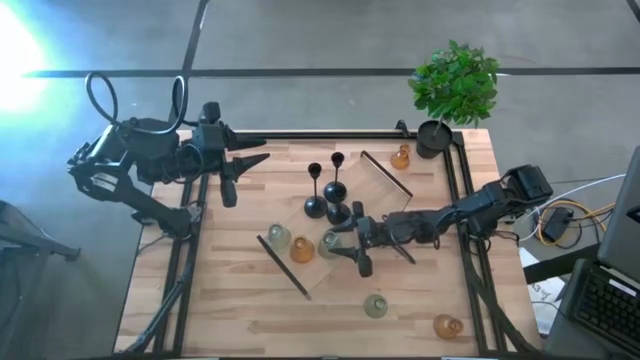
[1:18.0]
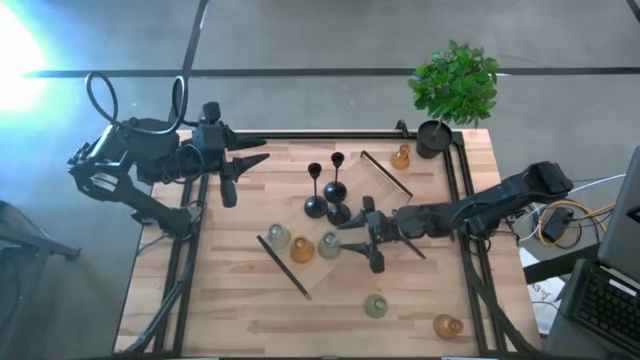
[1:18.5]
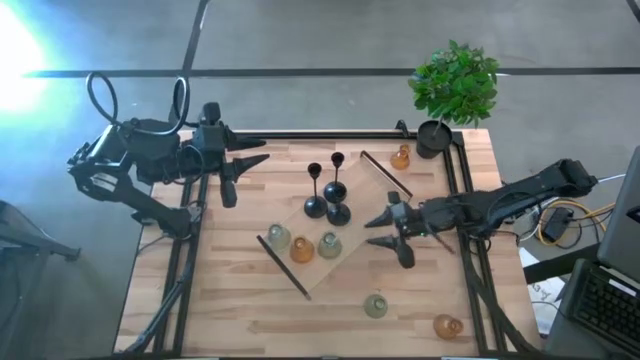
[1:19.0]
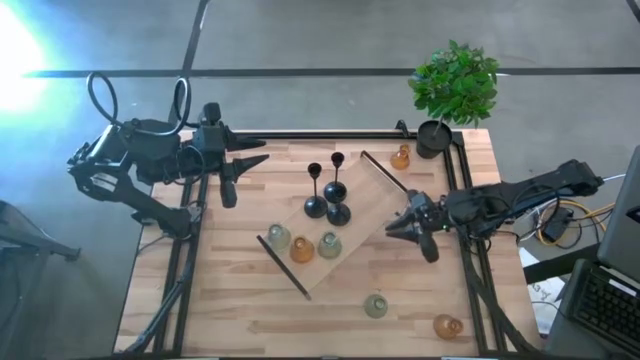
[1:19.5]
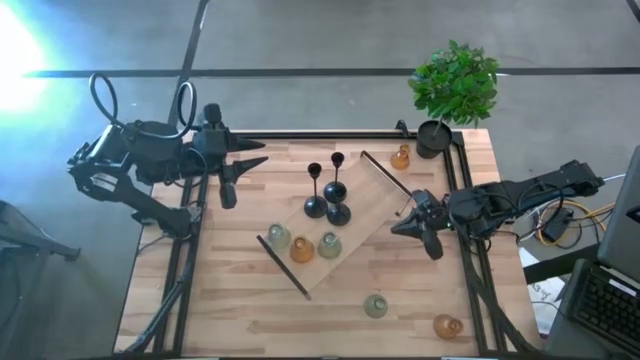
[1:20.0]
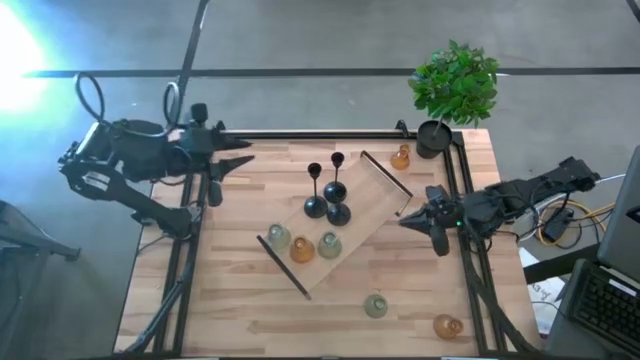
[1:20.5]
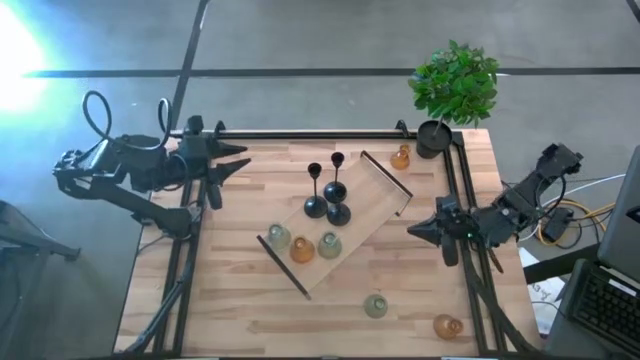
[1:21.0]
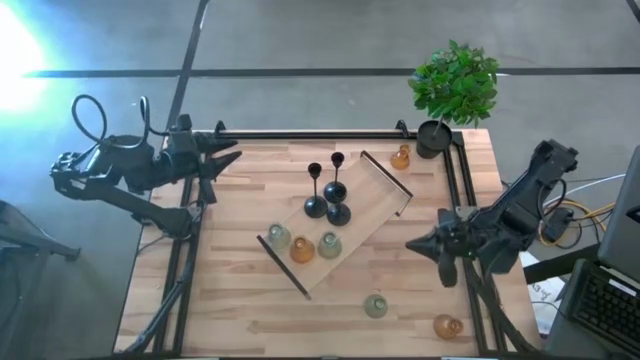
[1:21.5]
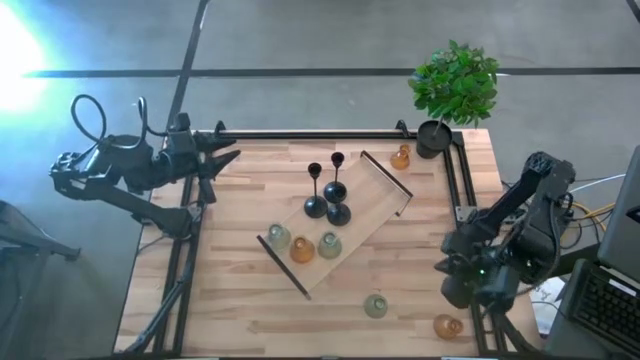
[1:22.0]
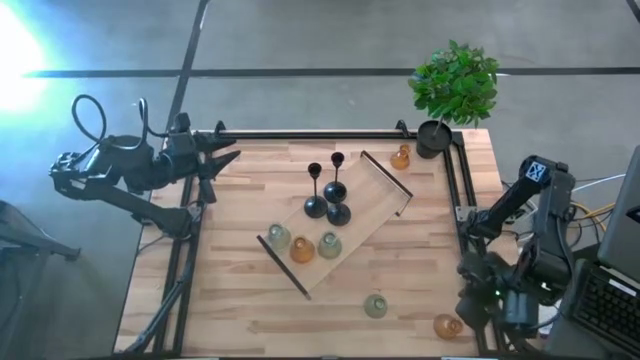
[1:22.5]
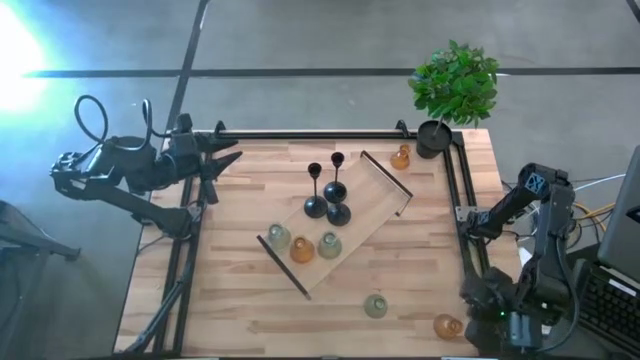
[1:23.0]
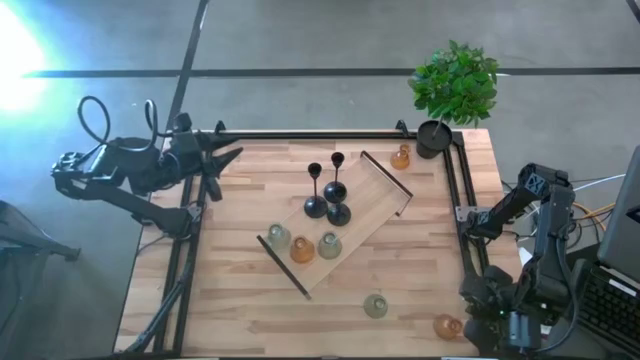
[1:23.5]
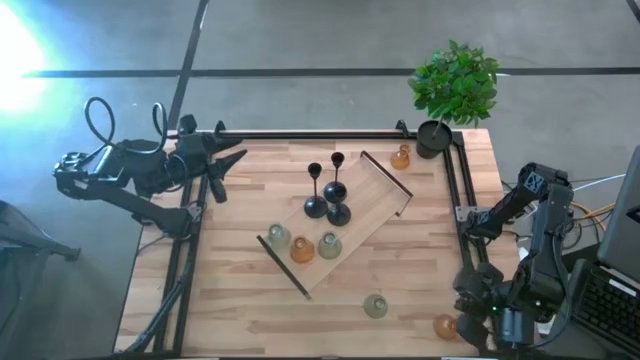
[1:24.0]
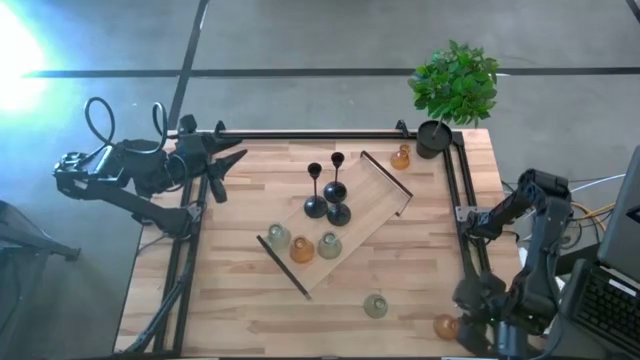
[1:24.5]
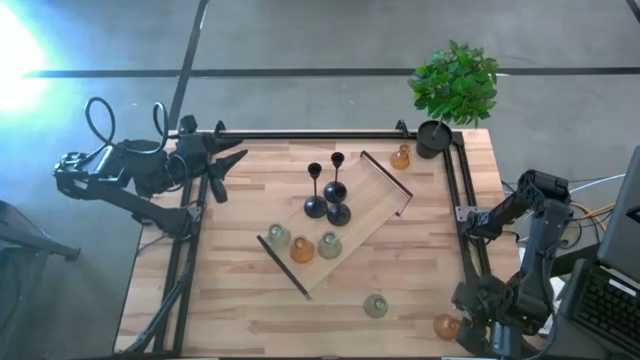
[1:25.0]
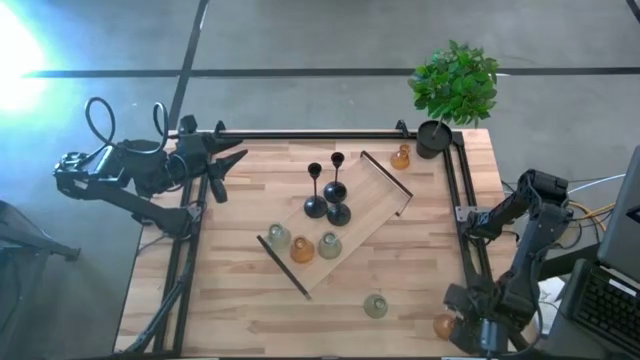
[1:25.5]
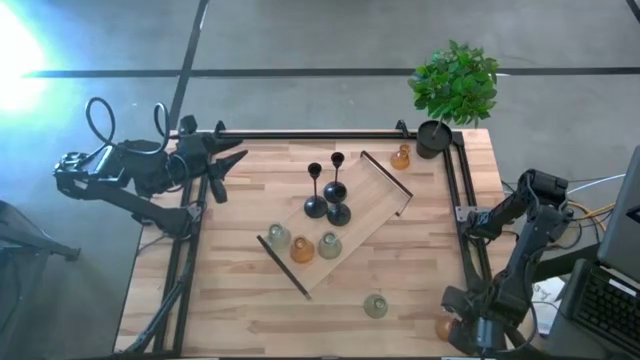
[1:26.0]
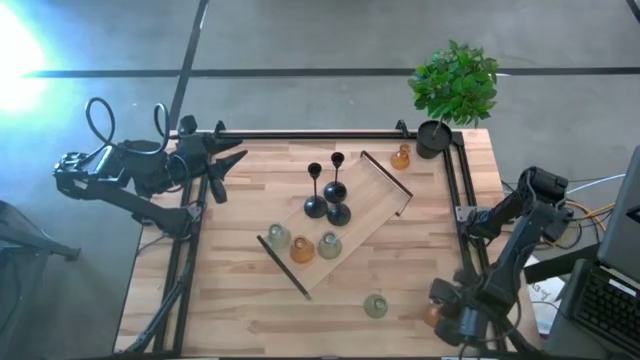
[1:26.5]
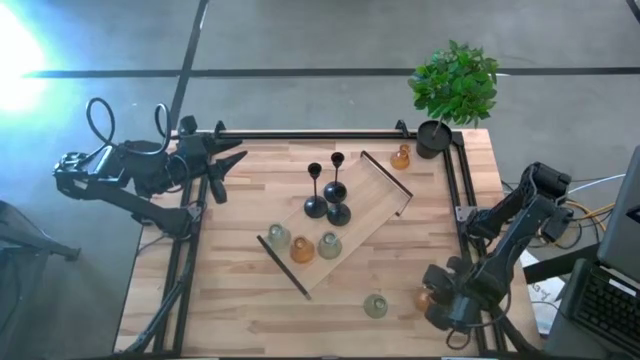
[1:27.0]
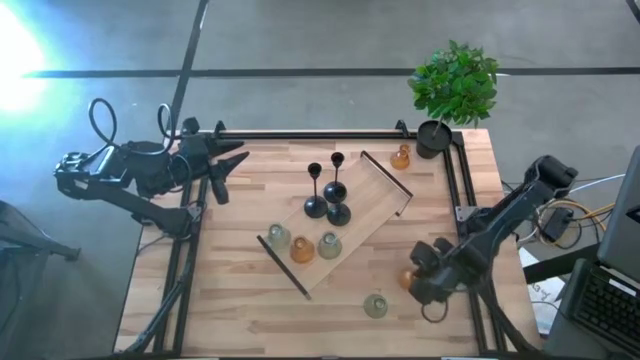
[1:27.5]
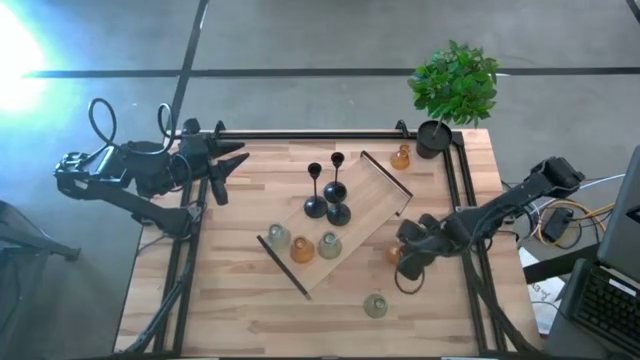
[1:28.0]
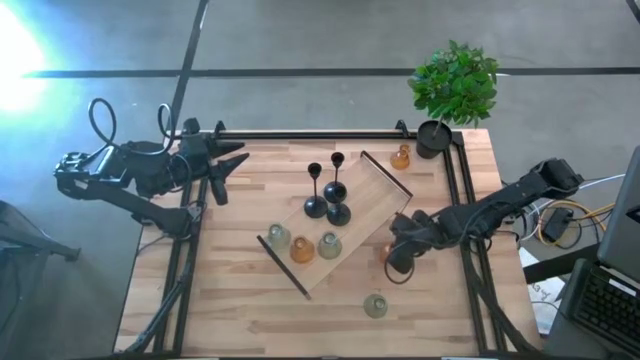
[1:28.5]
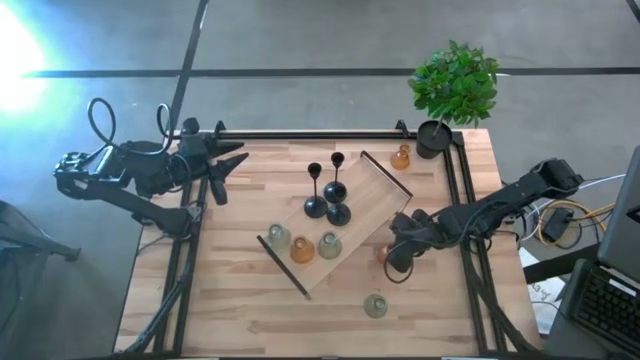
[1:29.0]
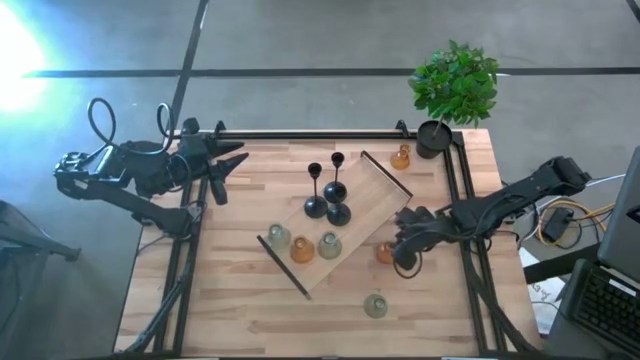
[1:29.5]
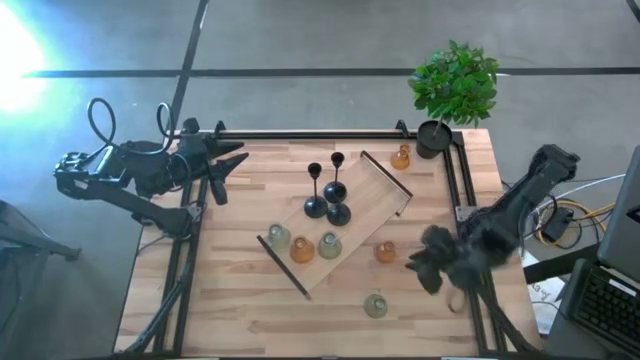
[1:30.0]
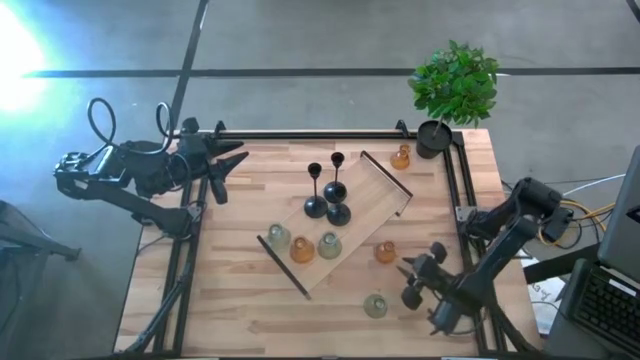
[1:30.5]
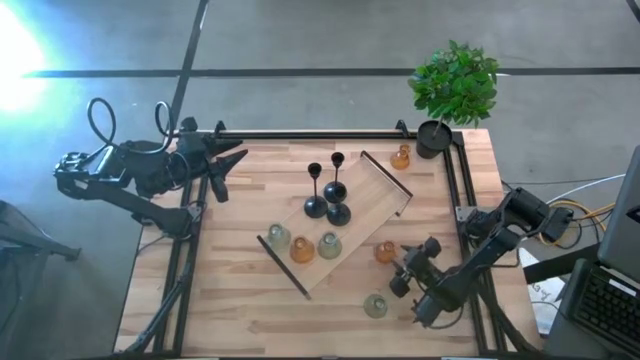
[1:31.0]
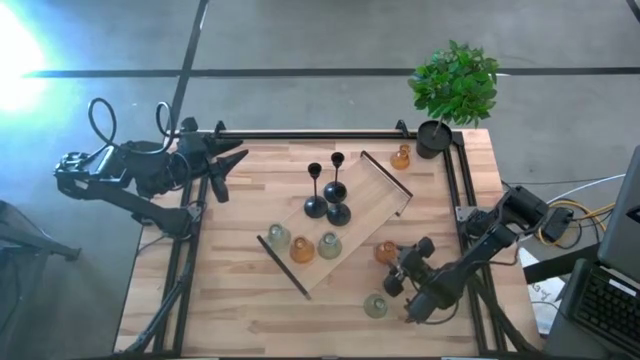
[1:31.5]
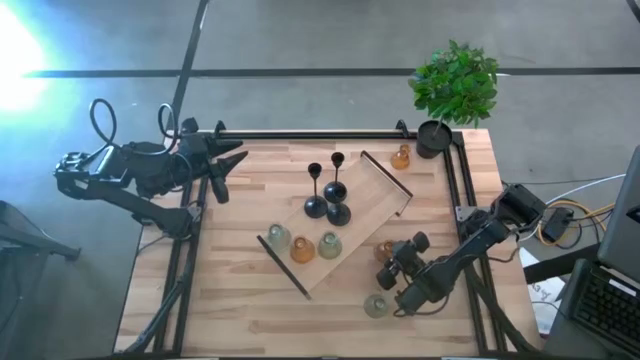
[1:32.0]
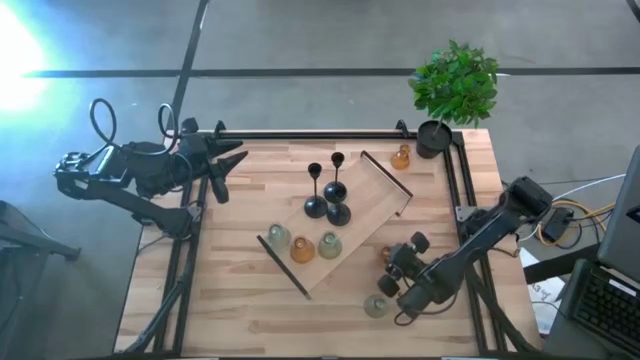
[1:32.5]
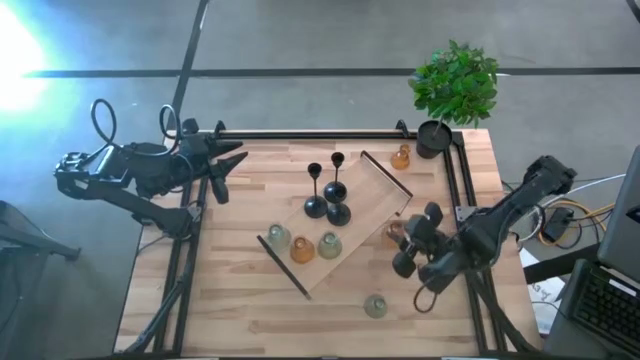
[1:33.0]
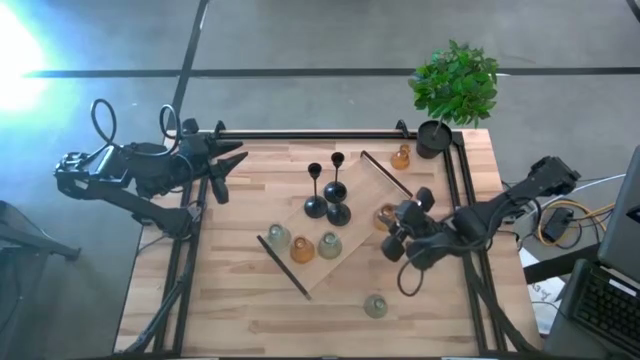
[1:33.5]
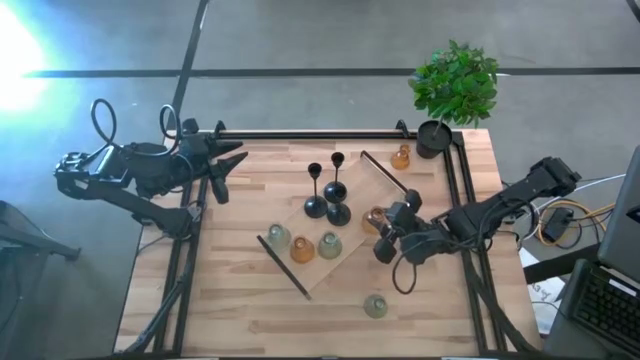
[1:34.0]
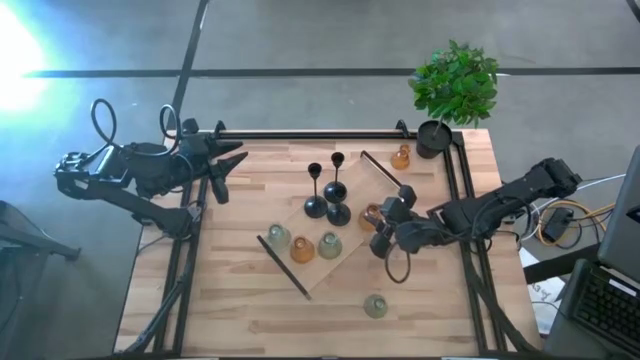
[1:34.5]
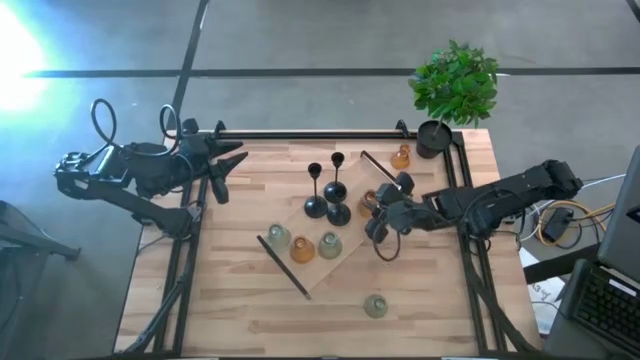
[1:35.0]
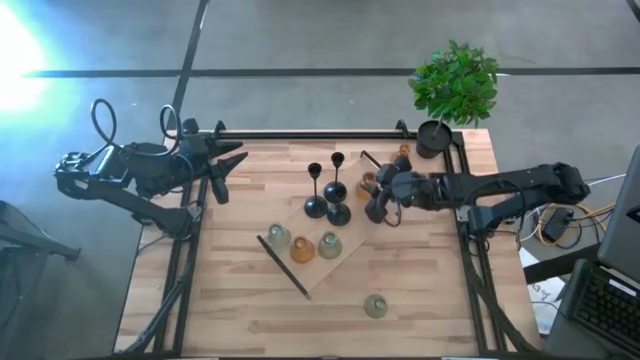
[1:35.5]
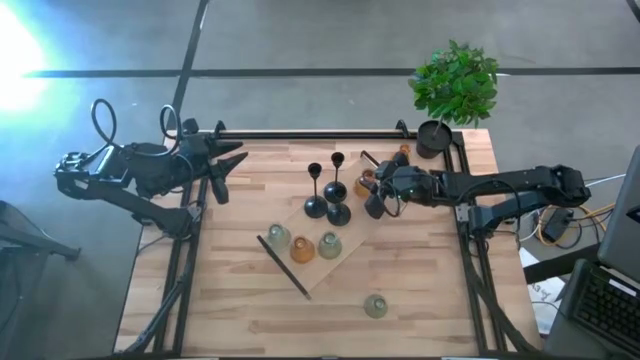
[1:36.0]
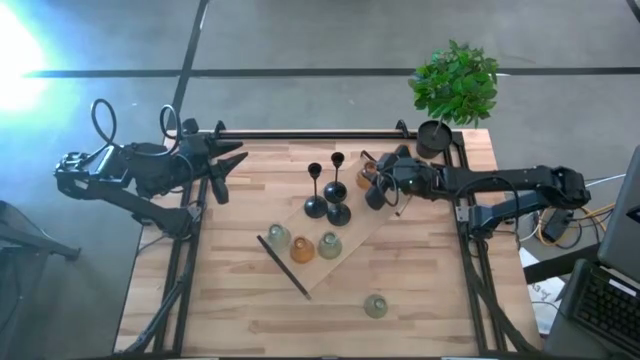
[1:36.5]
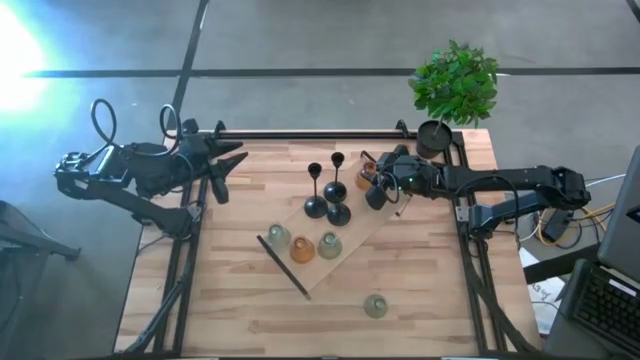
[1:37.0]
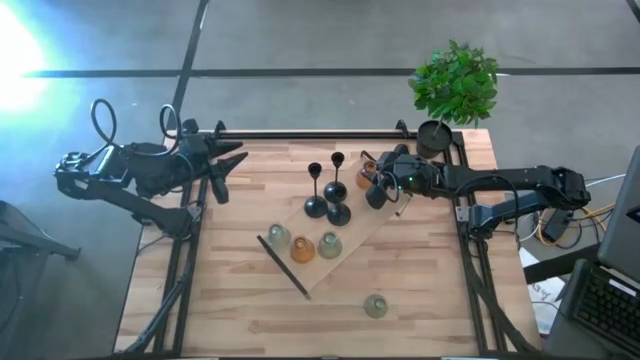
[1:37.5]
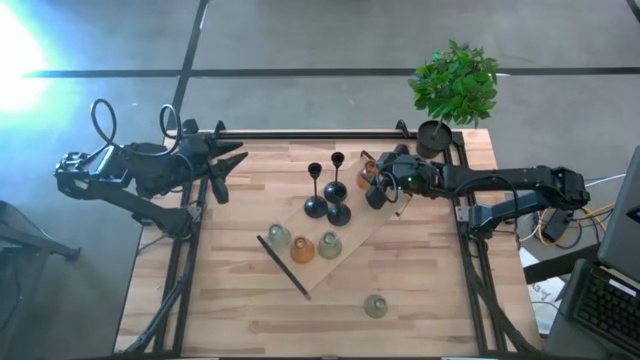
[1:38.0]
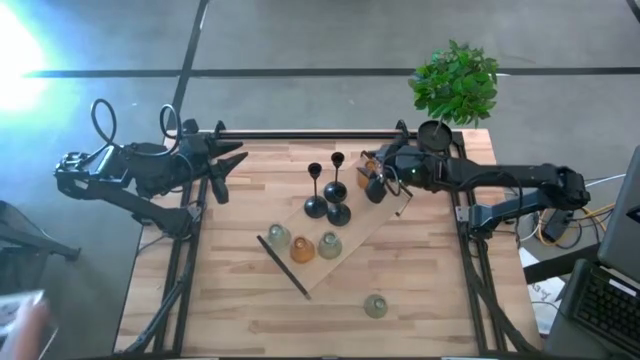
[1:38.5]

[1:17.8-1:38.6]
Task: Pick & Place candle stick holders
Put the bottom yellow candle holder on the shelf

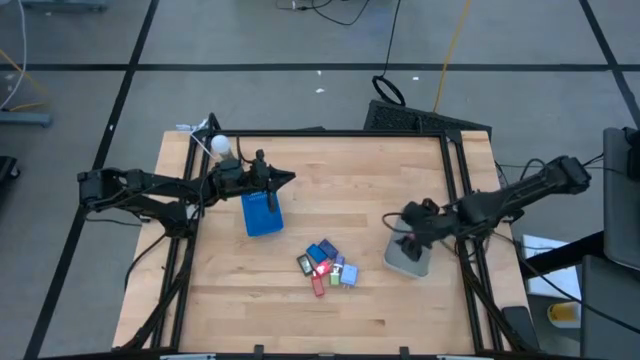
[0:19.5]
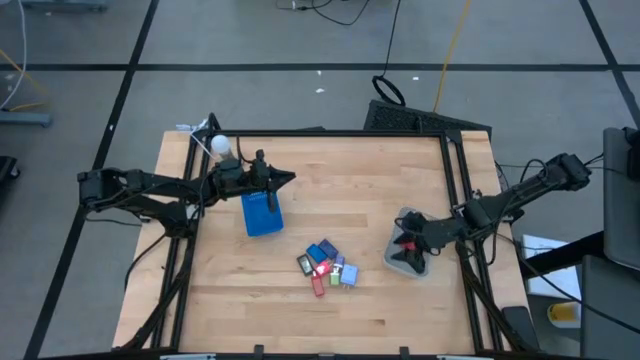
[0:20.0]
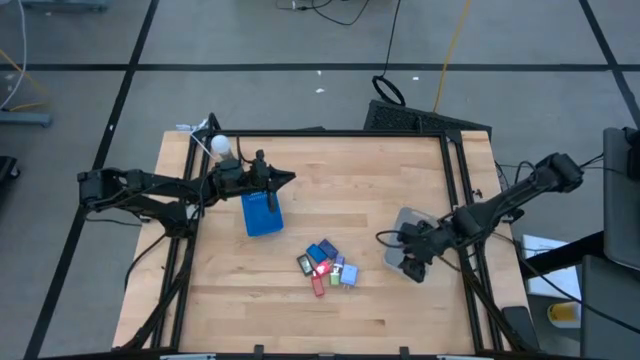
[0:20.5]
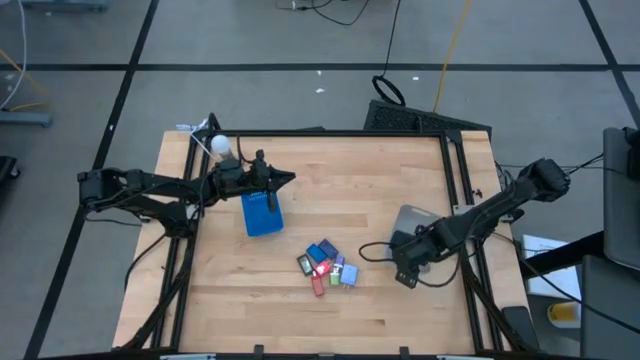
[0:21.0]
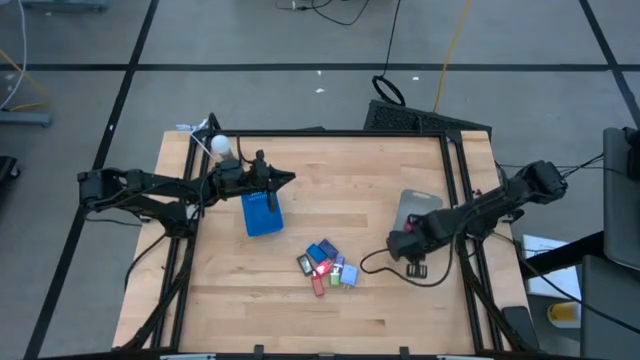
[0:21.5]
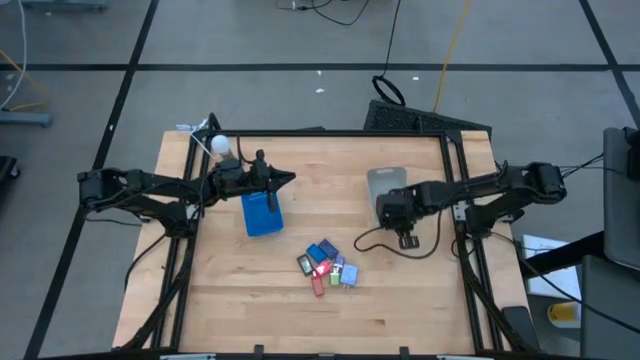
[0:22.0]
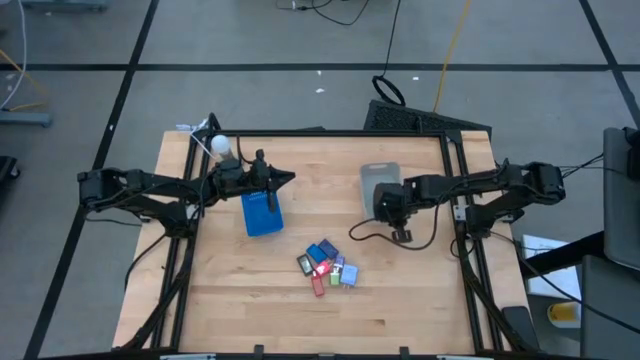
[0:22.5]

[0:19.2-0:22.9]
Task: Pick & Place Office items
Move the grey bin
